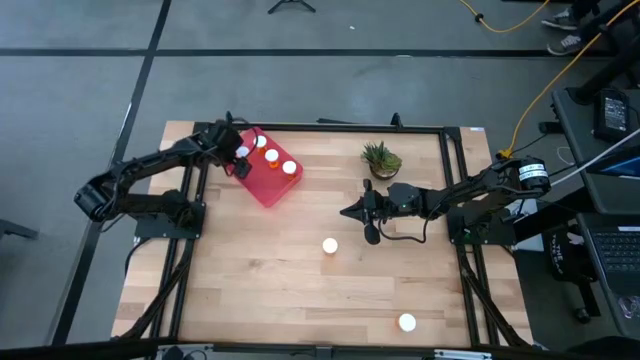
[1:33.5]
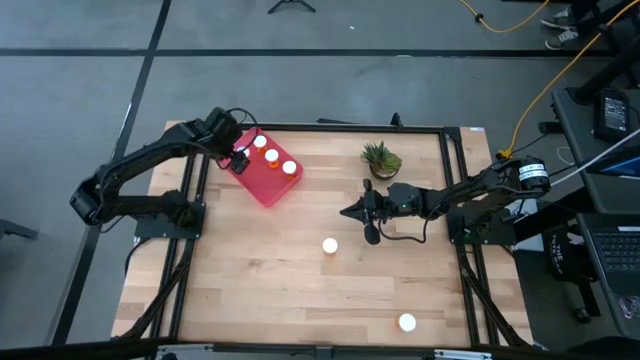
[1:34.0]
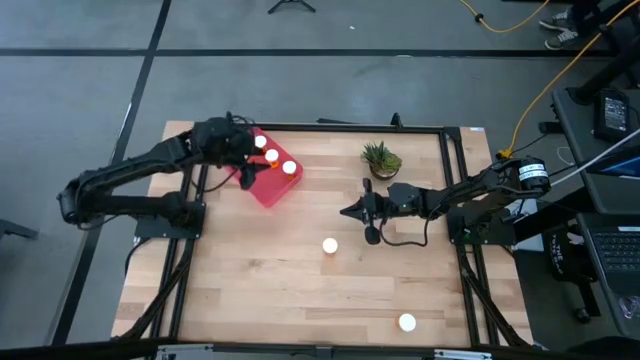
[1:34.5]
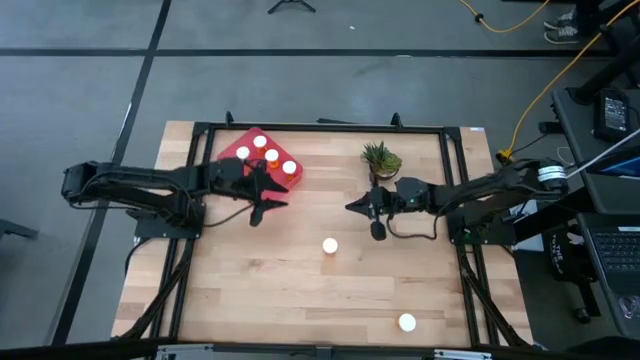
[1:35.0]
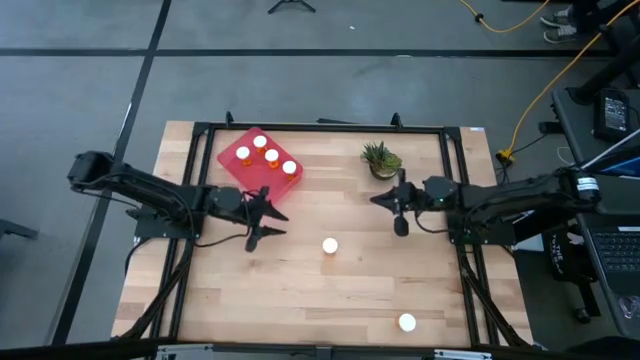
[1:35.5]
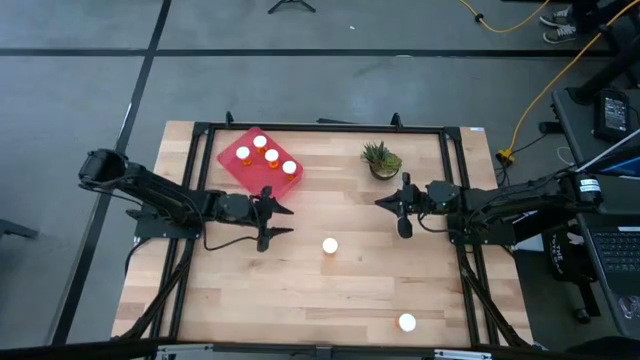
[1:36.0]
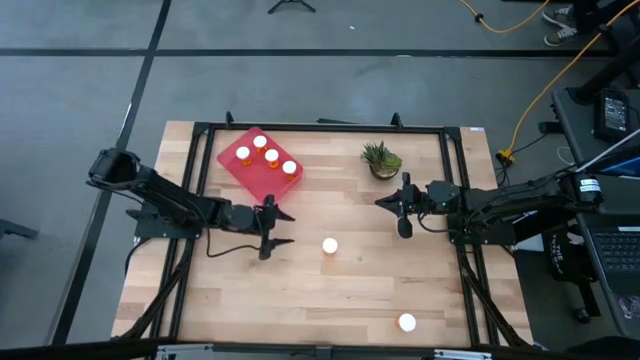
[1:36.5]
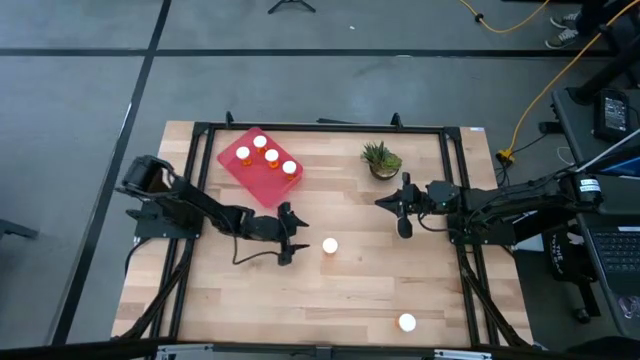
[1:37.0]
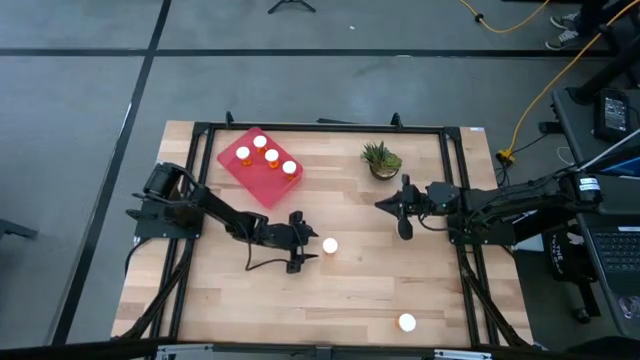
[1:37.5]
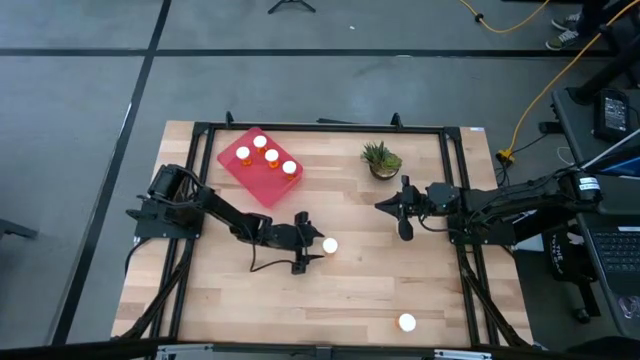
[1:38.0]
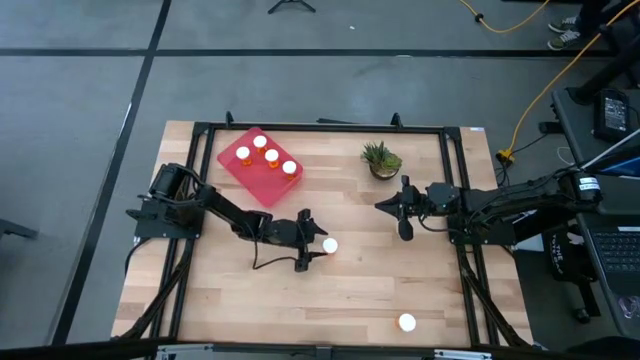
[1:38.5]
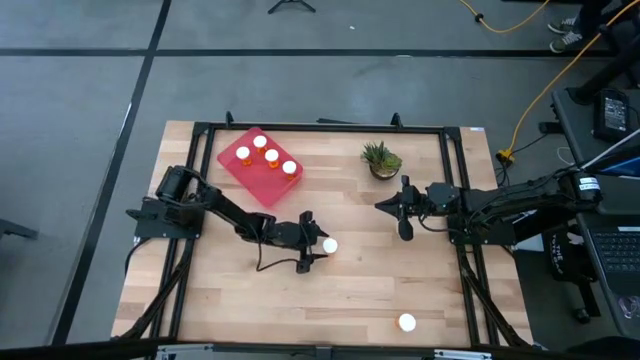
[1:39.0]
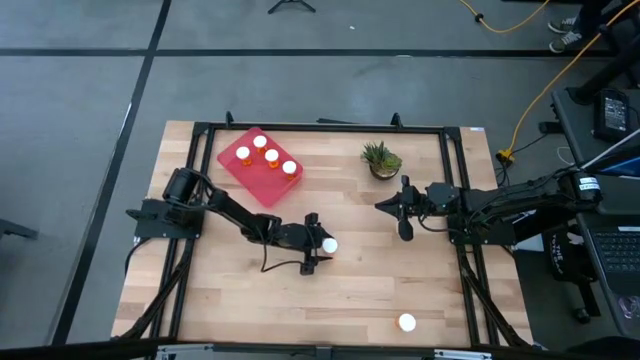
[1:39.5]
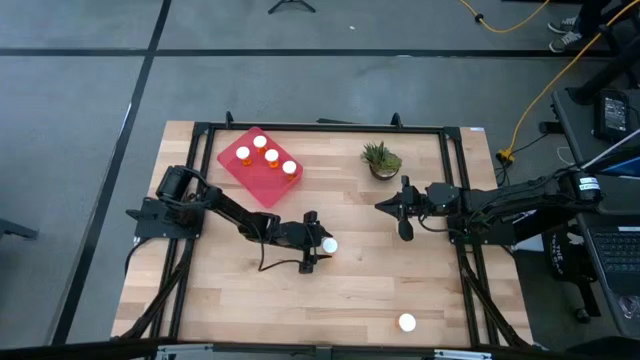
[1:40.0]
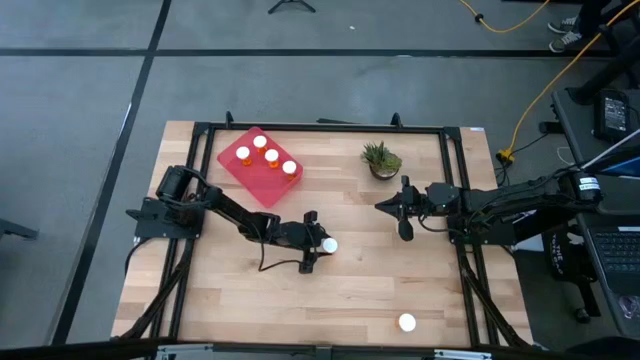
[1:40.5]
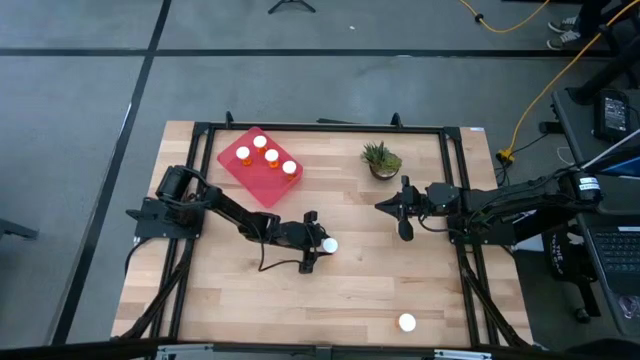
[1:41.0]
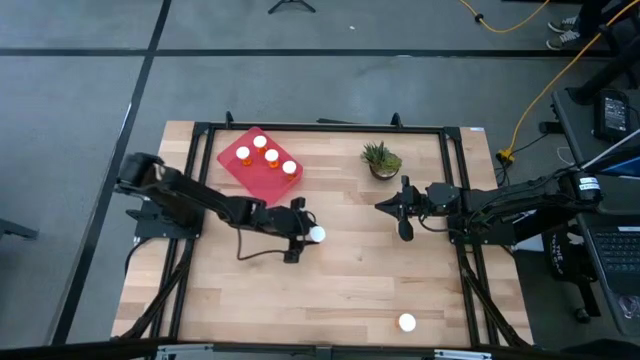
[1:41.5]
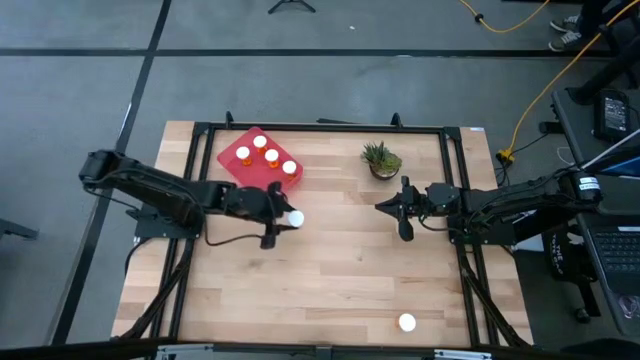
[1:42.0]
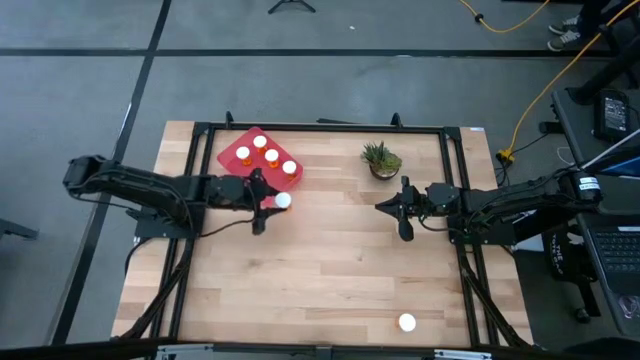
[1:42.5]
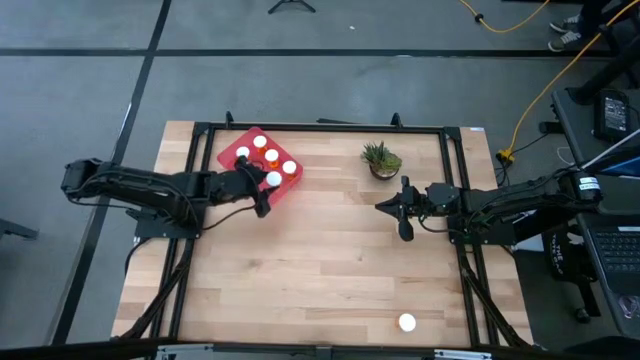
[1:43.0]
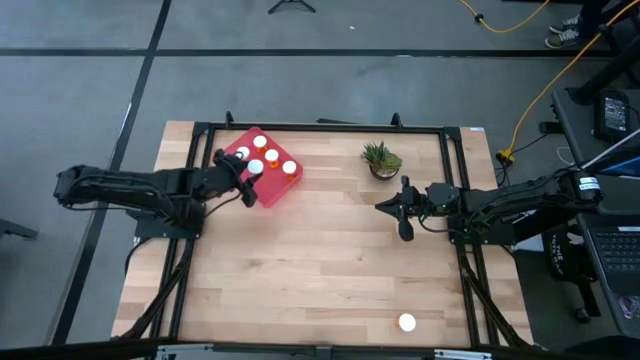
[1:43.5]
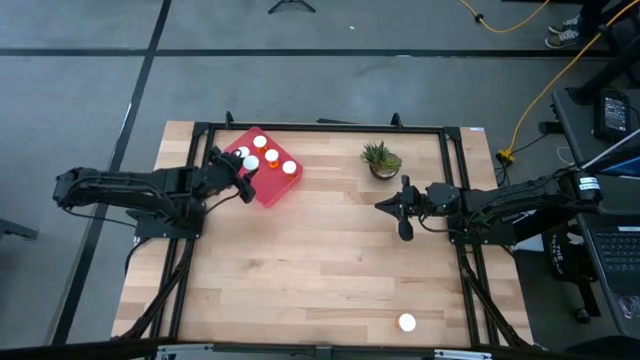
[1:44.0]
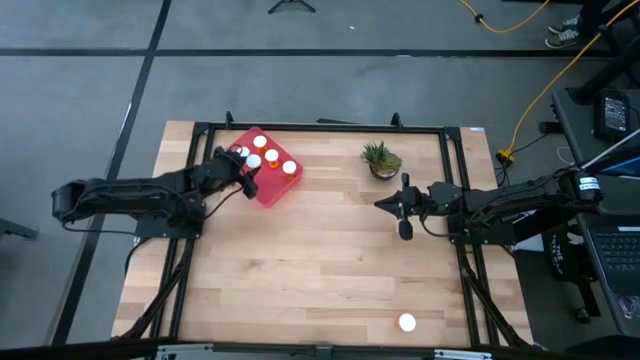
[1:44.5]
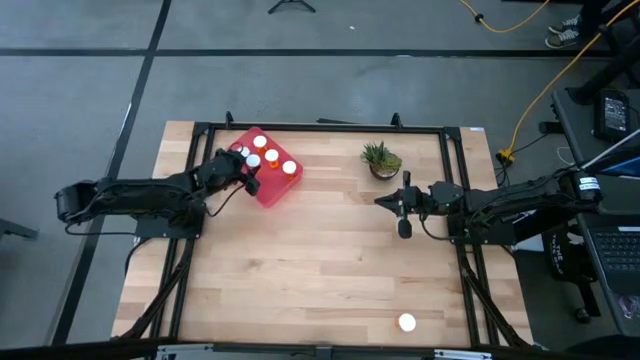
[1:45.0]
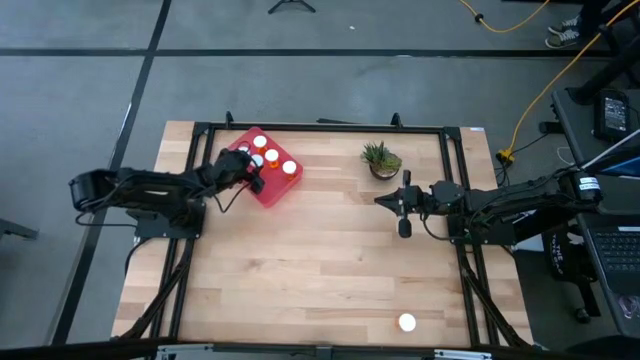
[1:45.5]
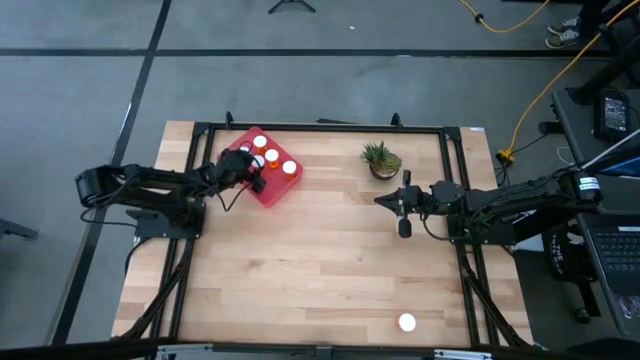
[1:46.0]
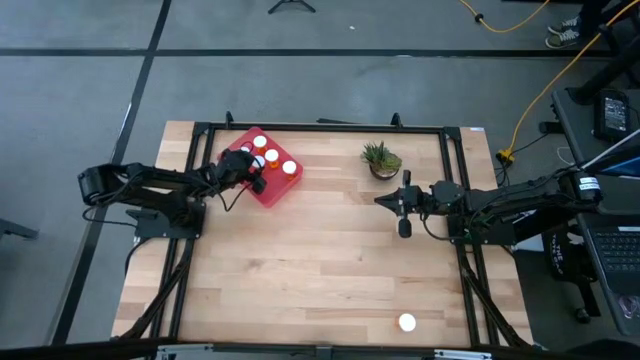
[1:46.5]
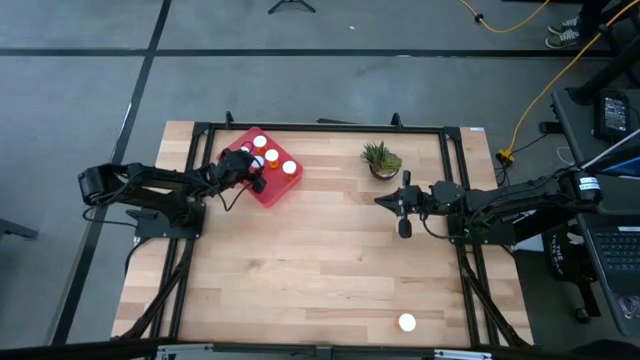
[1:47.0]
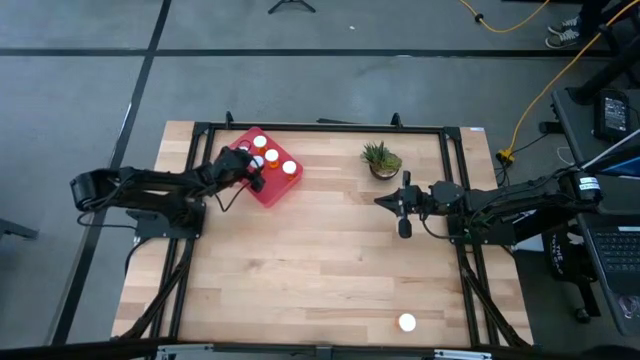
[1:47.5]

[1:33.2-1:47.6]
Task: Pick and place pill bottles into a basket
Put the top orange pill bottle into the red container

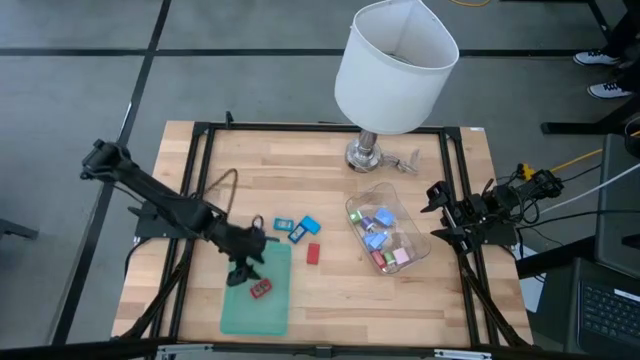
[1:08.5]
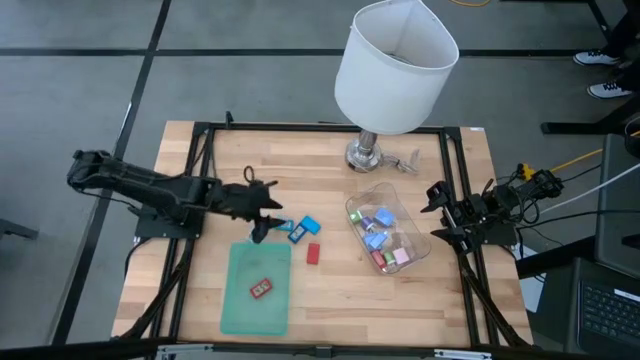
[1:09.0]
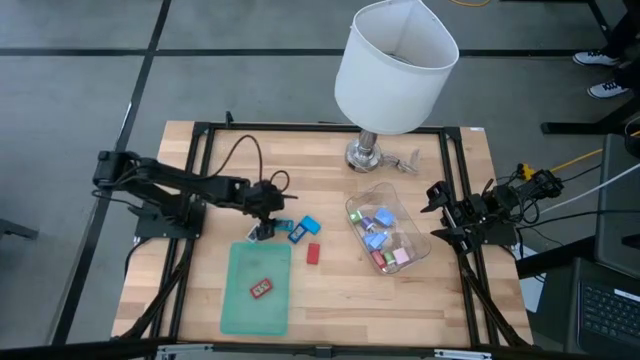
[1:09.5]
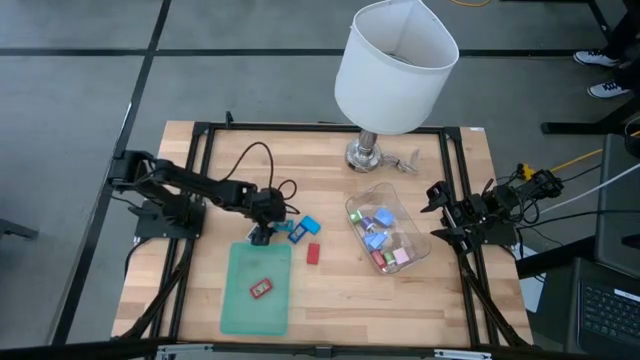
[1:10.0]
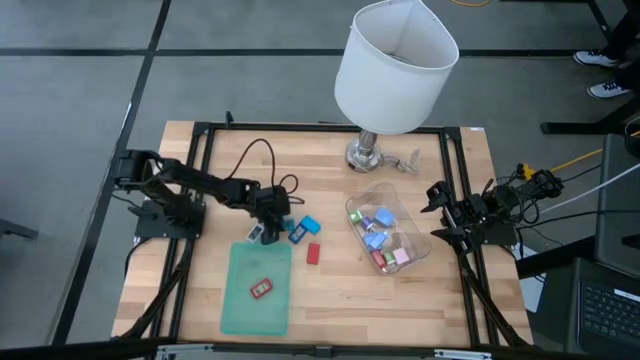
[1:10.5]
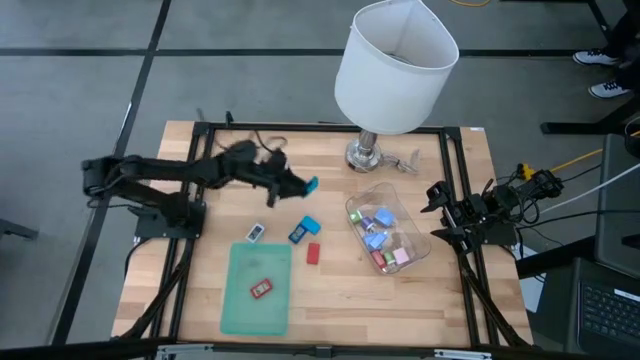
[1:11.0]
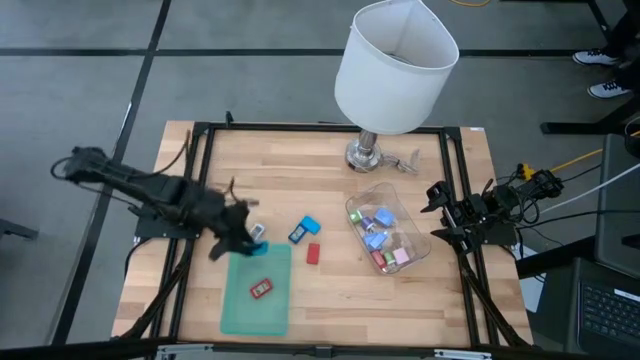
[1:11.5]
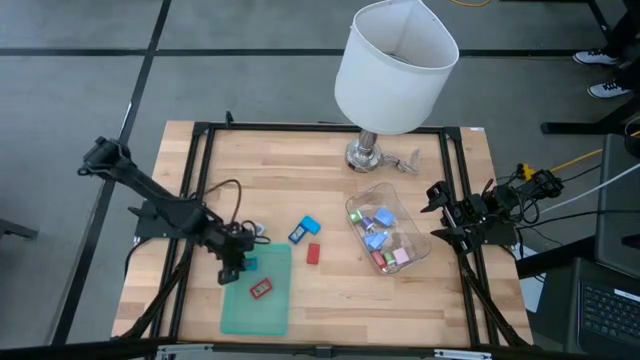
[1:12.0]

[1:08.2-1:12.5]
Task: Pick & Place Office items
Put the left light blue digital clock into the green bin

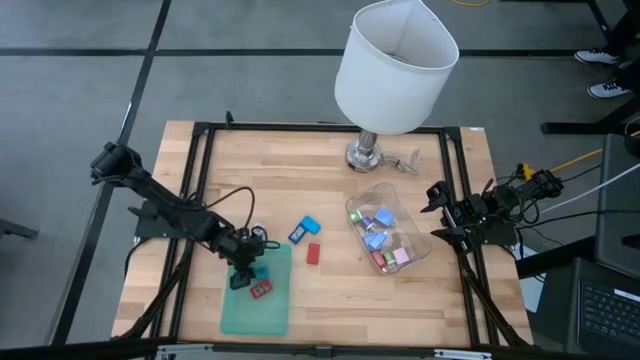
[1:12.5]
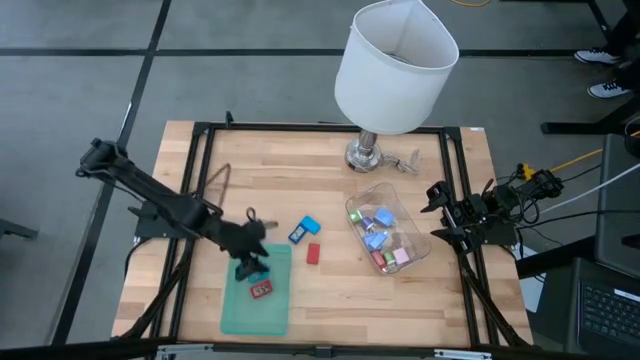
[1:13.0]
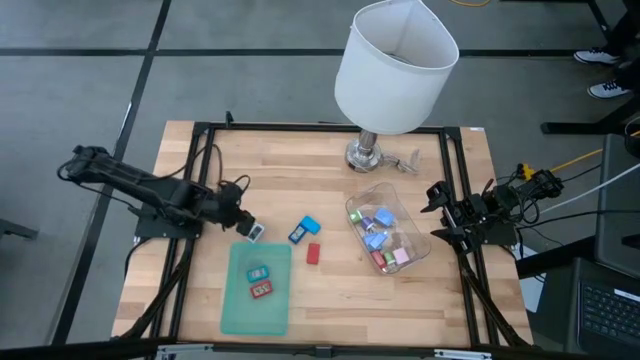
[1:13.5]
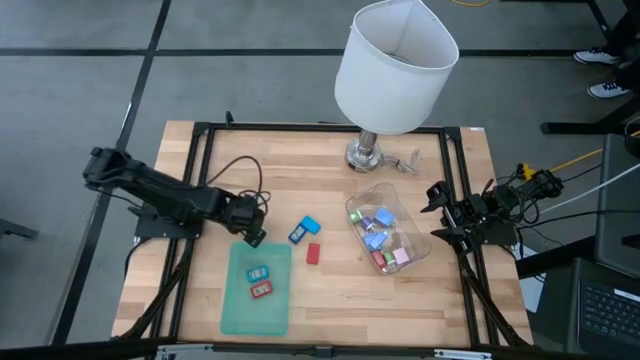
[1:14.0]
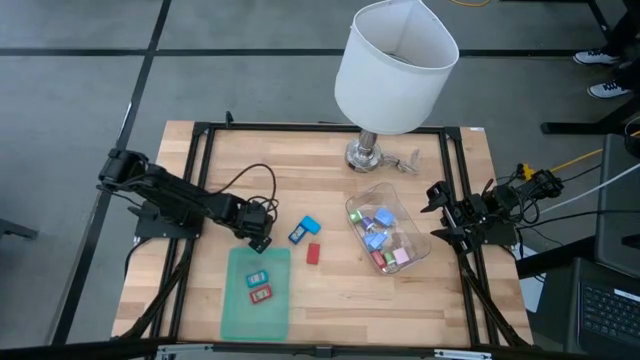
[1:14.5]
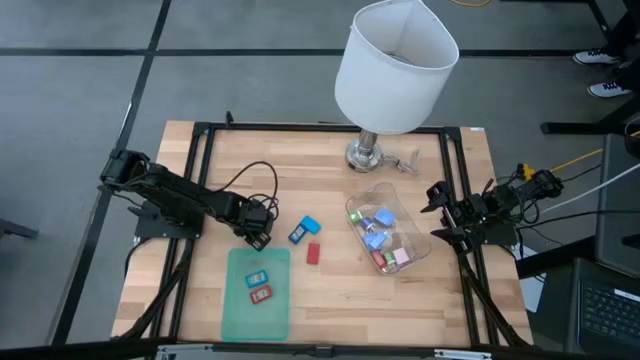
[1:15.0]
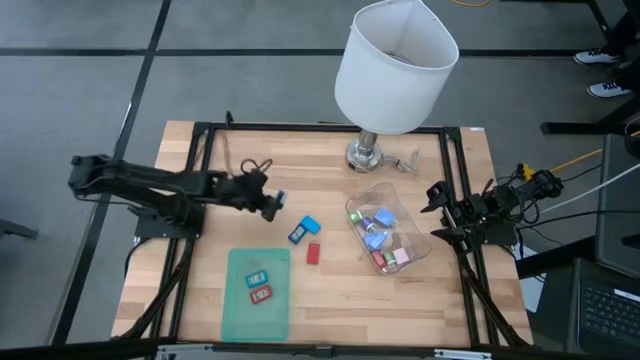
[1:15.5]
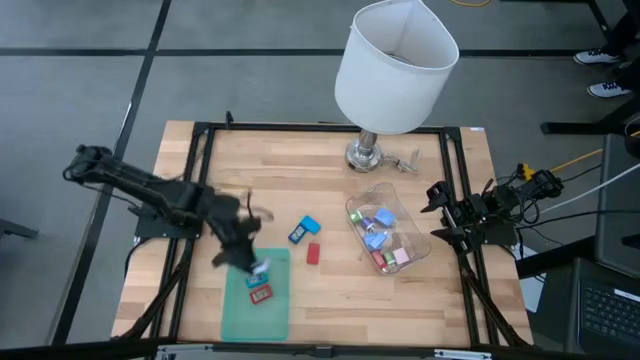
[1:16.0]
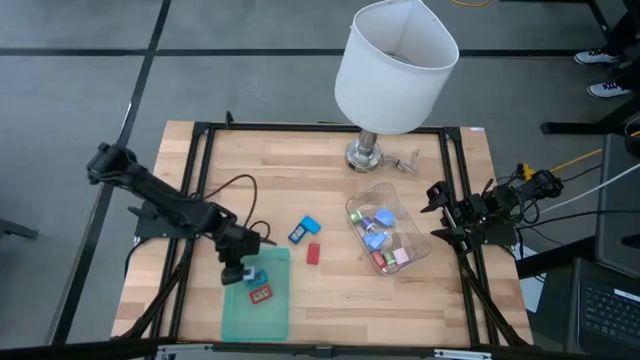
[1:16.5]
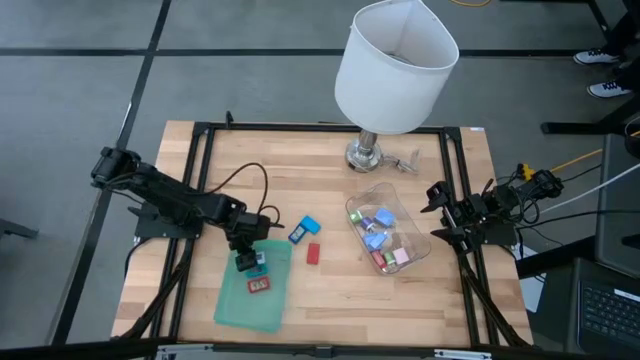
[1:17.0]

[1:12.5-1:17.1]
Put the white digital clock into the green bin
